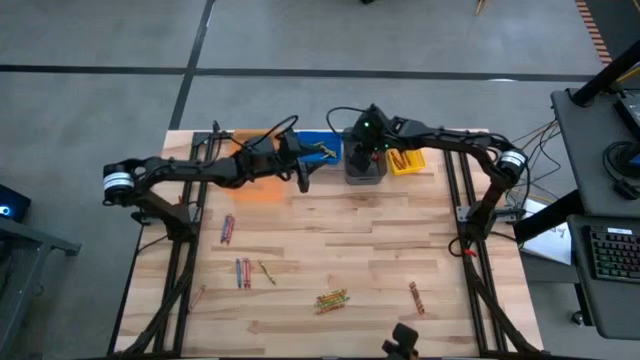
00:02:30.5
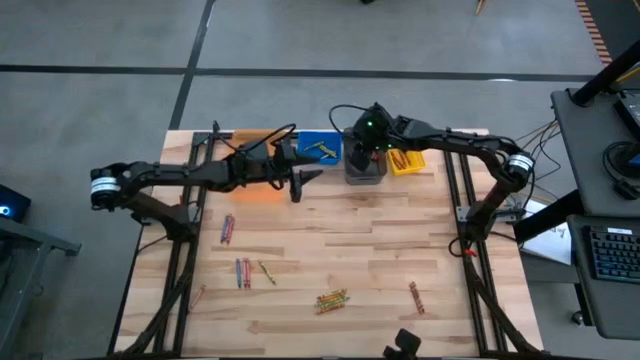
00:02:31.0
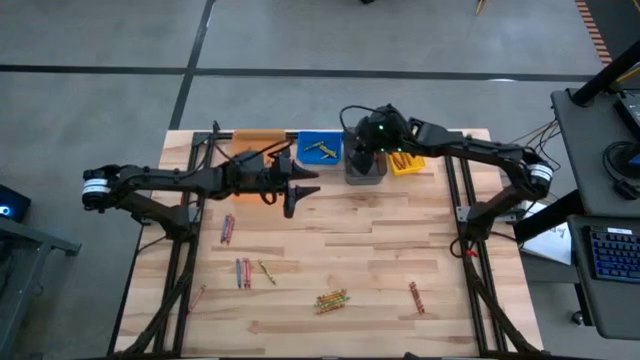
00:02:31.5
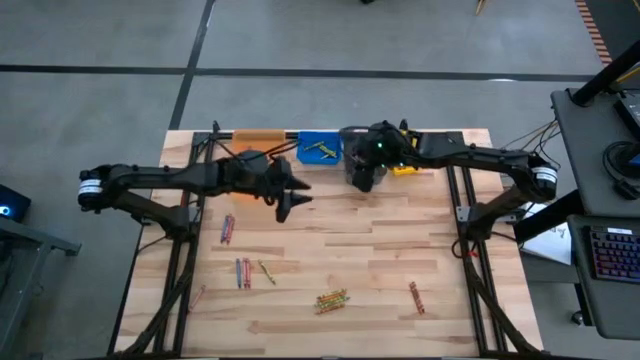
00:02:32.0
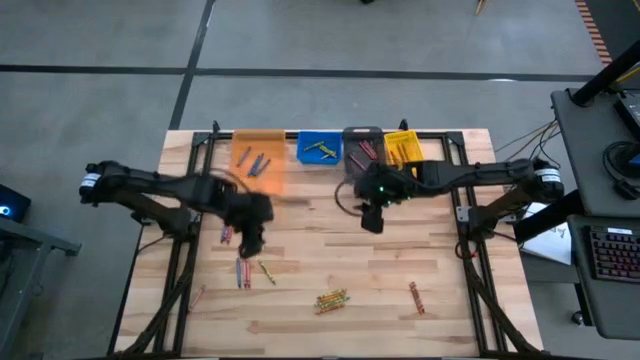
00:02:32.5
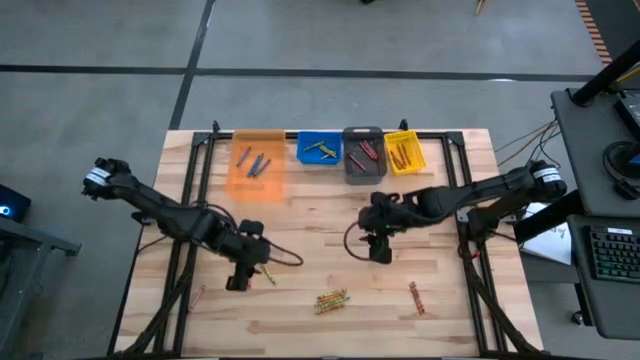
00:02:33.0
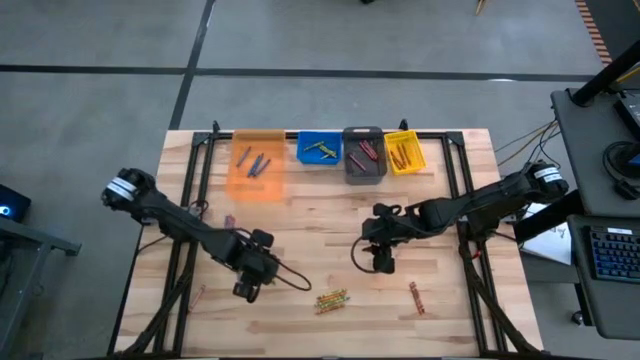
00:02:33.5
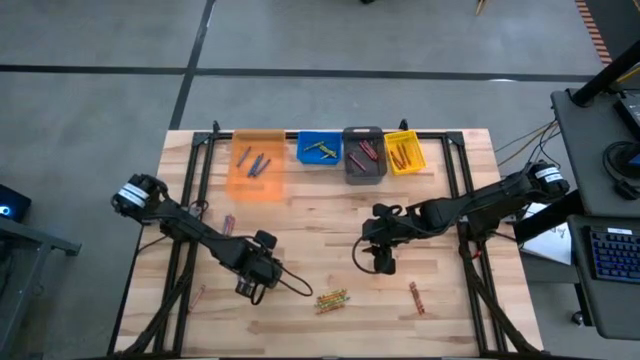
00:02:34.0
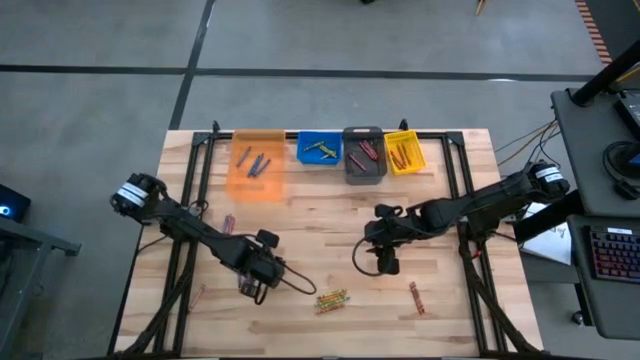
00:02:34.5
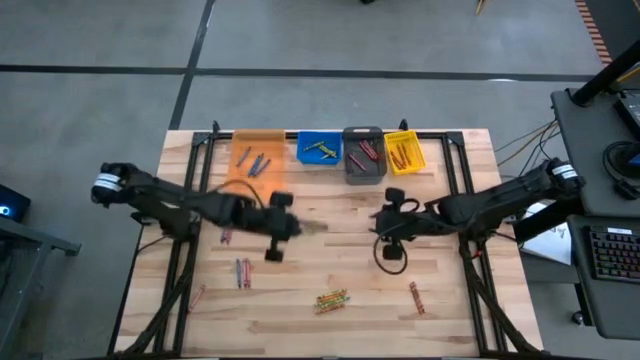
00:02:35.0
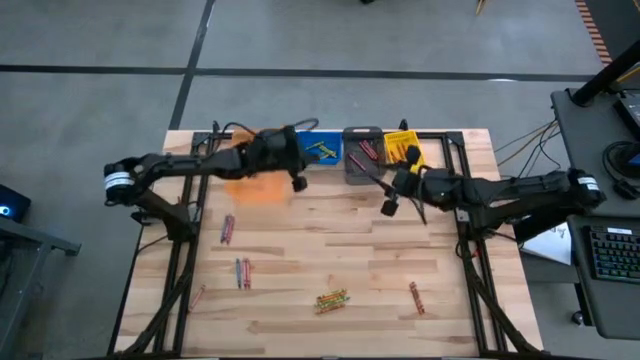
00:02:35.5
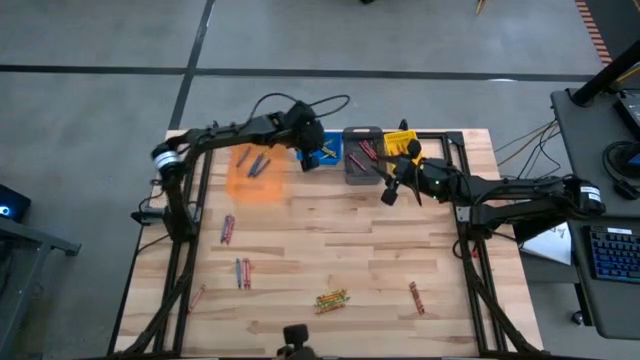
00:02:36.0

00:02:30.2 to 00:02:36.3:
Task: Sort crayons
Put the green crayon into the blue bin

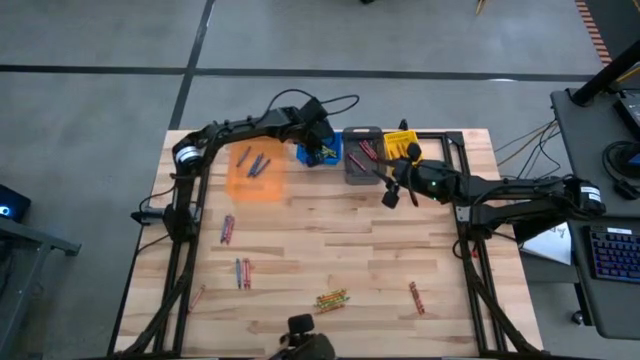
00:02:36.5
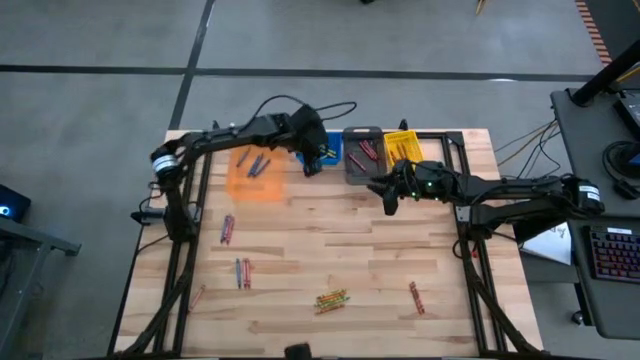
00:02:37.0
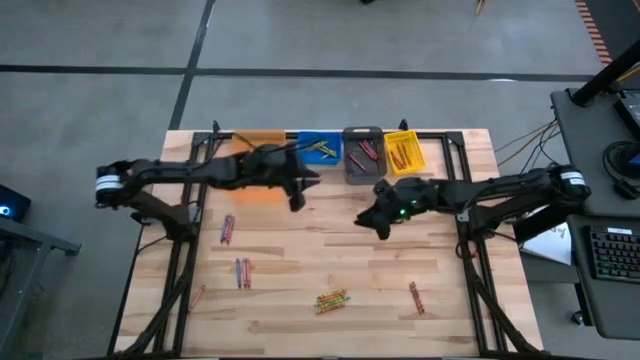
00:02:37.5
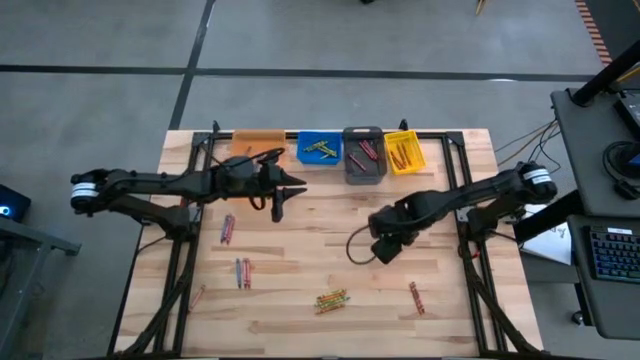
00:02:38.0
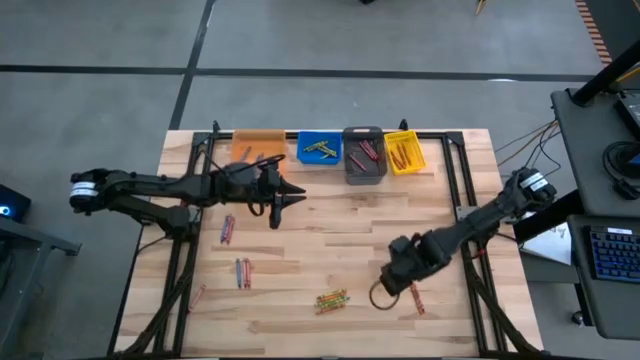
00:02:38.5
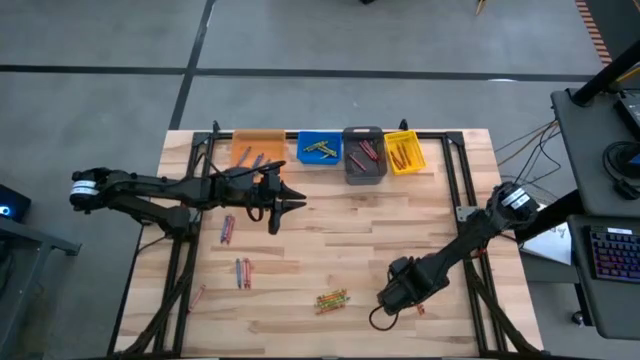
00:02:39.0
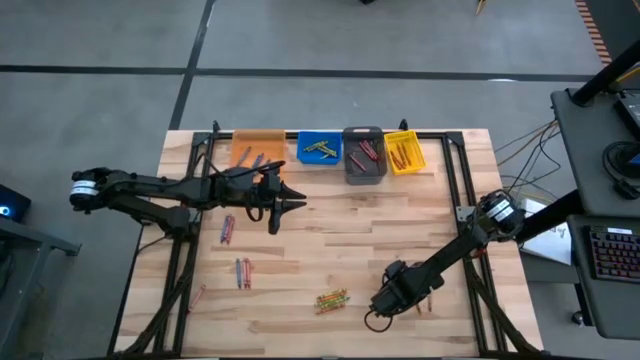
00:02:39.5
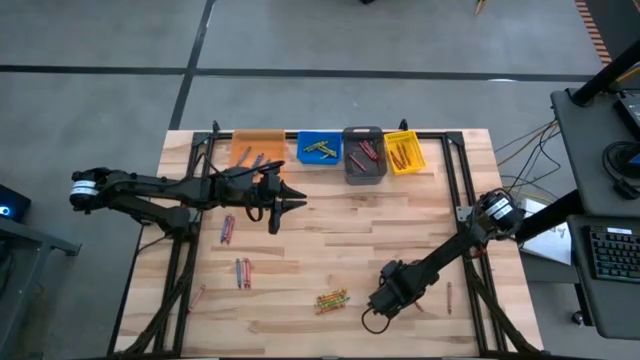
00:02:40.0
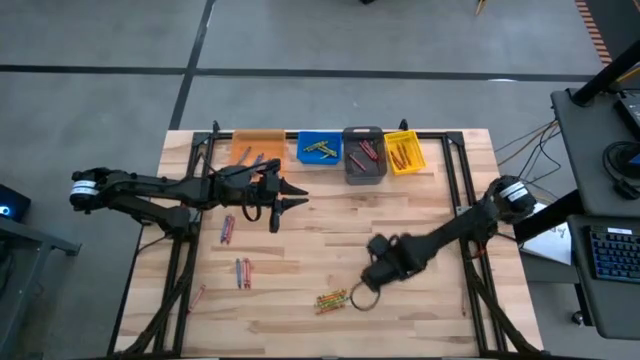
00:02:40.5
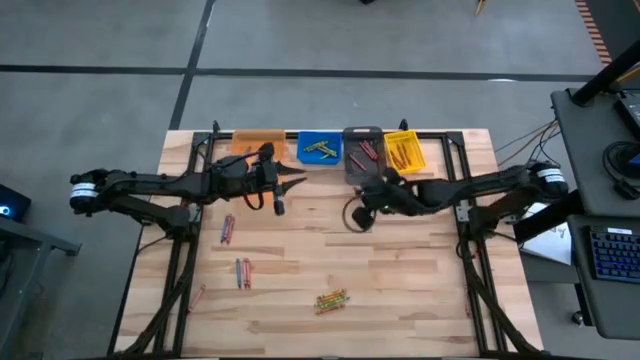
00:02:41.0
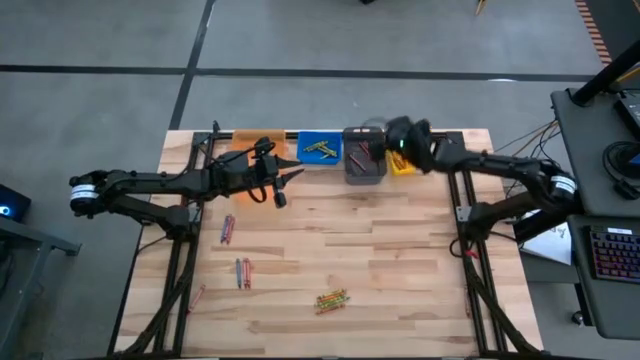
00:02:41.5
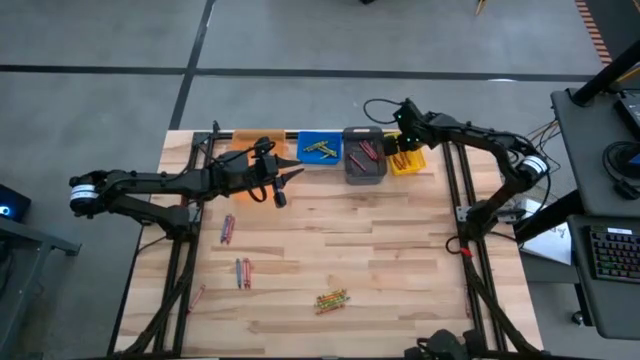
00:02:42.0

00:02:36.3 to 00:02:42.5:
Put the orange crayon into the yellow bin

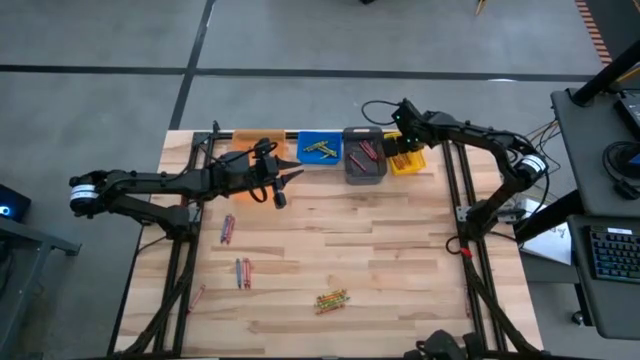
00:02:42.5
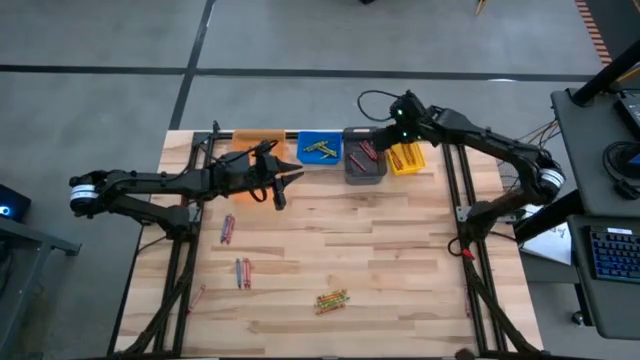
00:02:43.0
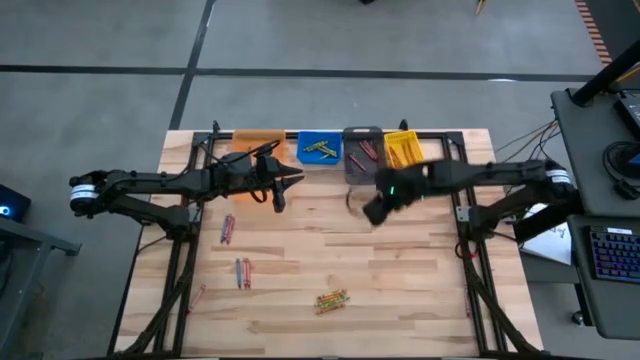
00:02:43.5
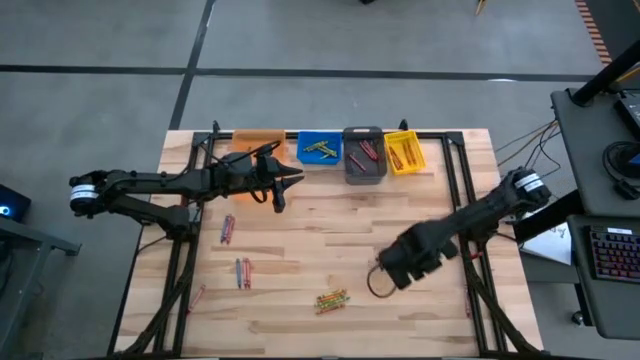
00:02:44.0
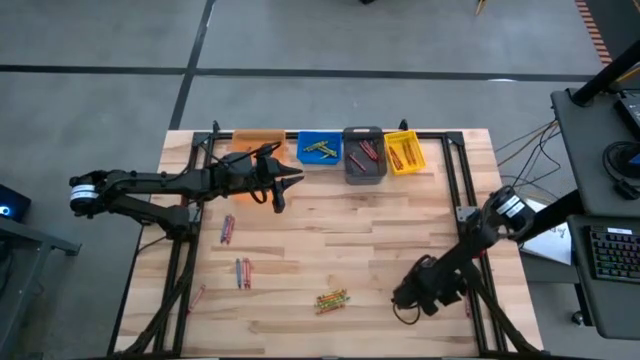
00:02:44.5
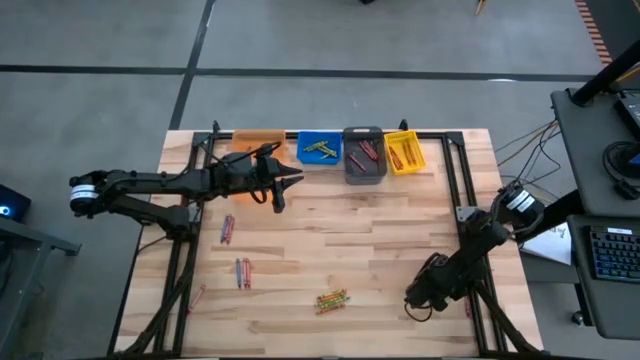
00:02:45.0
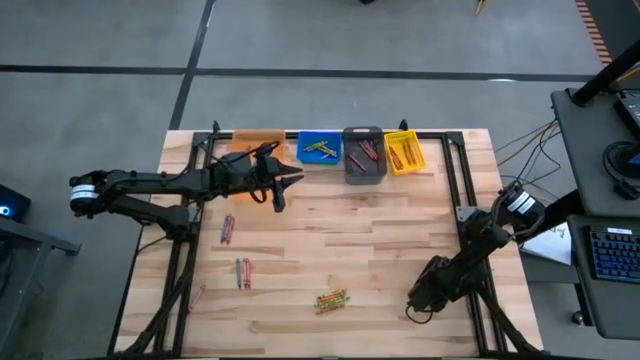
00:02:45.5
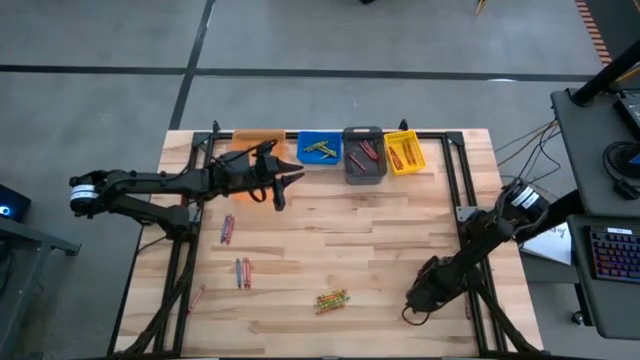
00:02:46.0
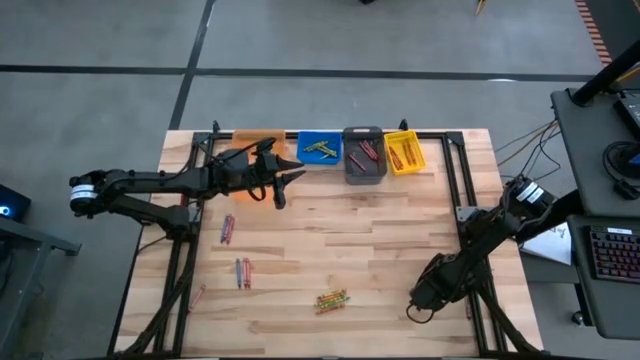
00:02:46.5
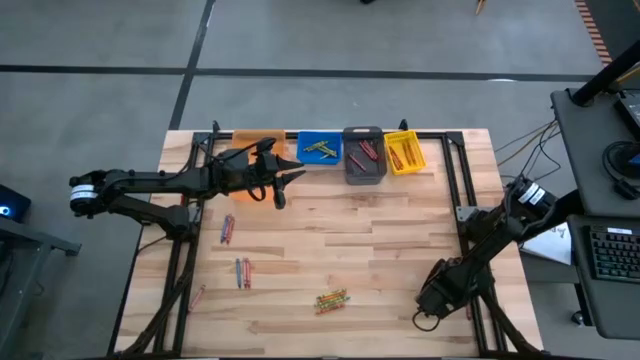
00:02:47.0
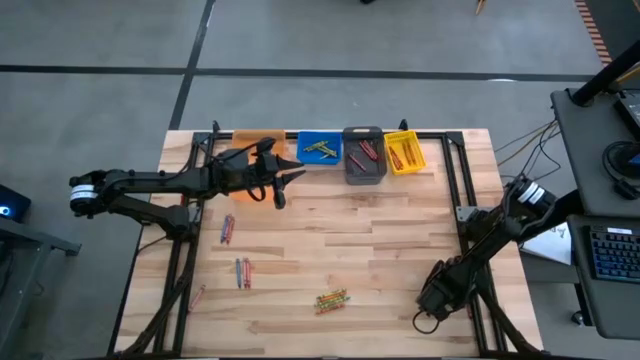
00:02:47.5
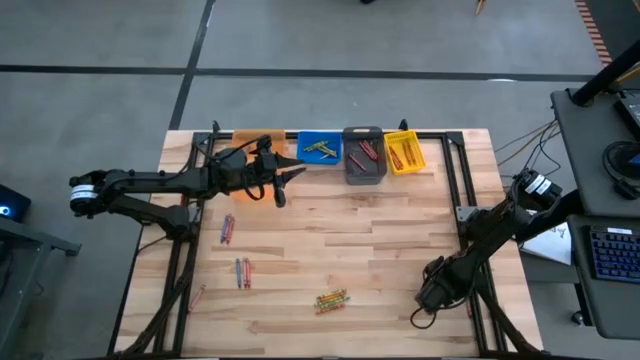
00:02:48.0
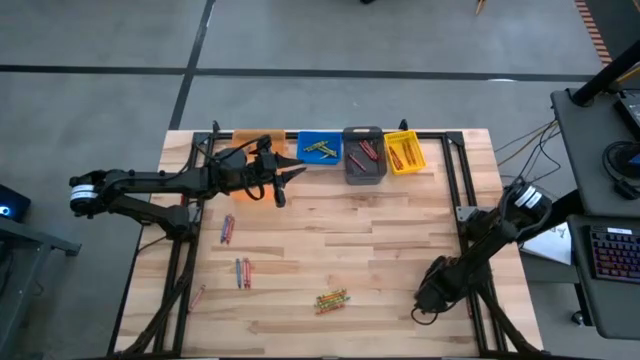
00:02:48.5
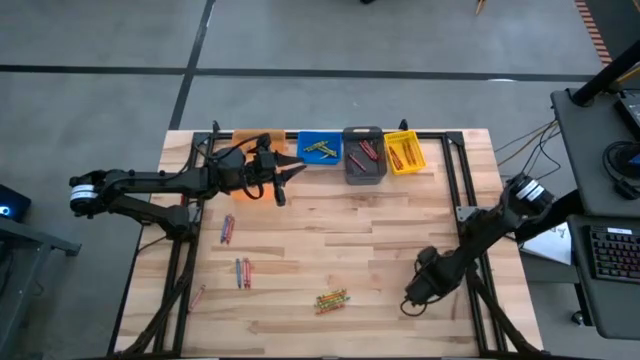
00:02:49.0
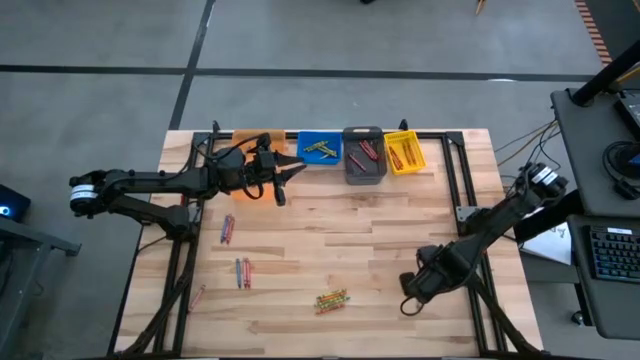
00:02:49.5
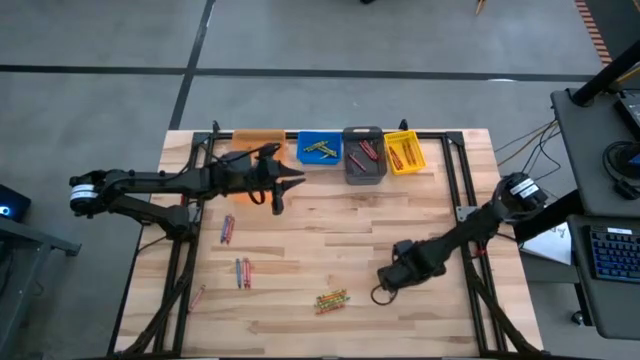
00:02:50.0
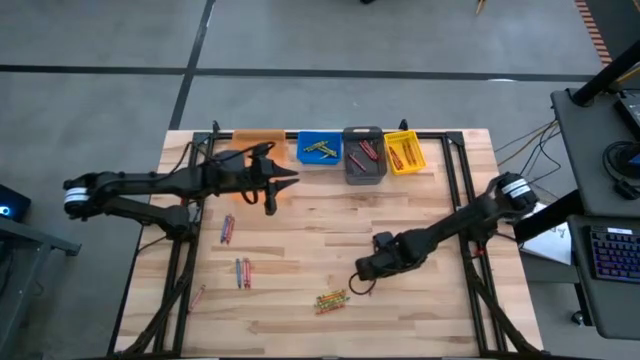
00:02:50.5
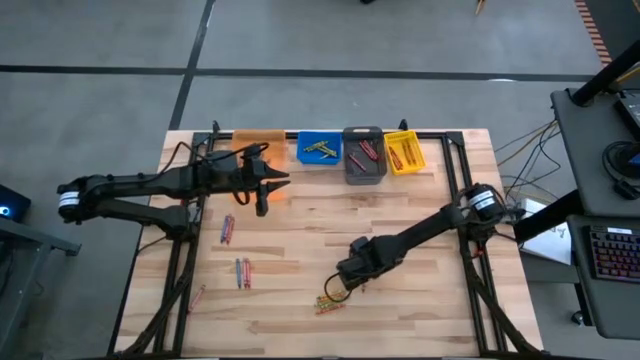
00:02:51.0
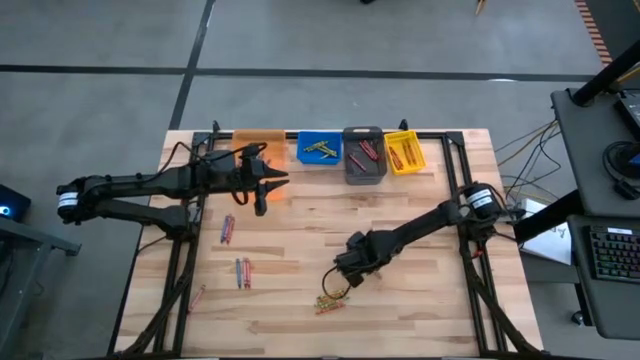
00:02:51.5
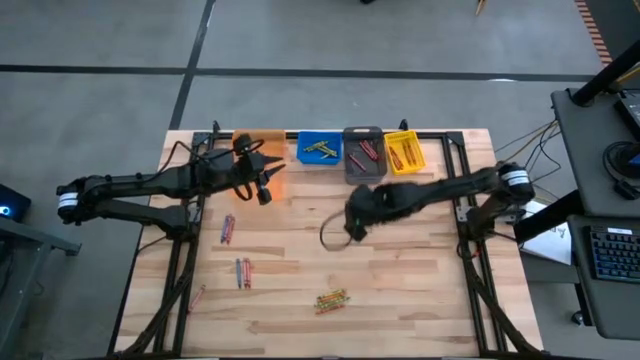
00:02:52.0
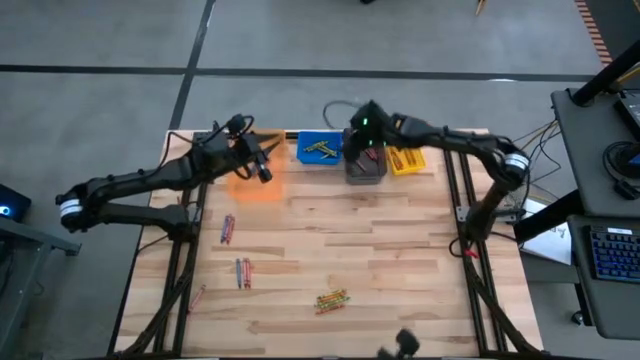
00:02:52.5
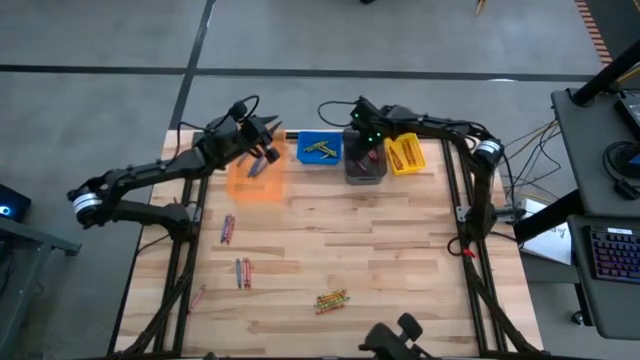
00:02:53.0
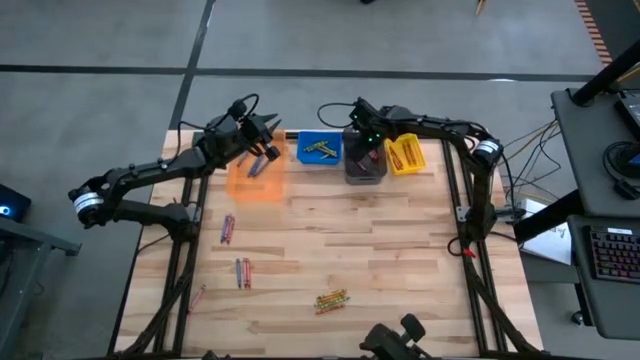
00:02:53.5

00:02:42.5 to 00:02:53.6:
Put the red crayon into the black bin
